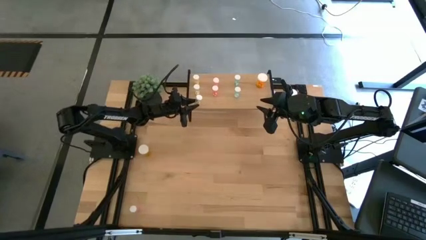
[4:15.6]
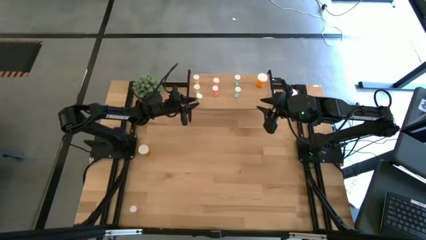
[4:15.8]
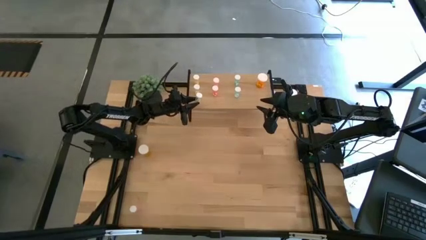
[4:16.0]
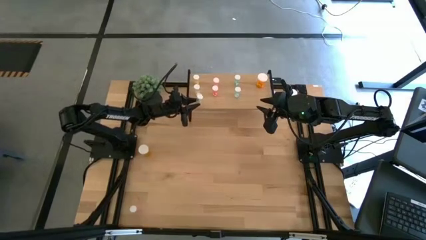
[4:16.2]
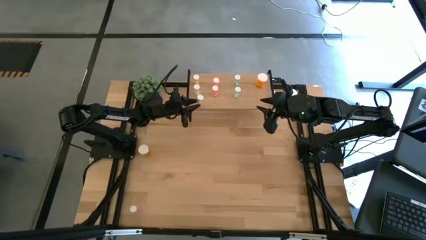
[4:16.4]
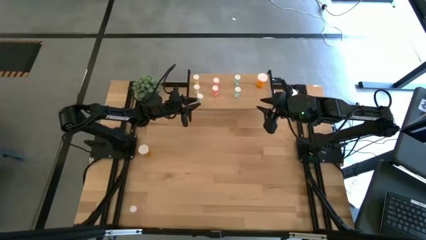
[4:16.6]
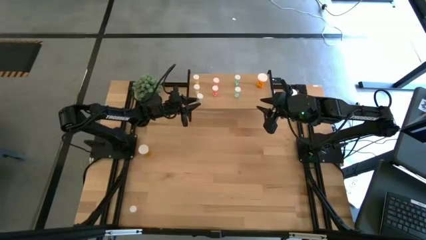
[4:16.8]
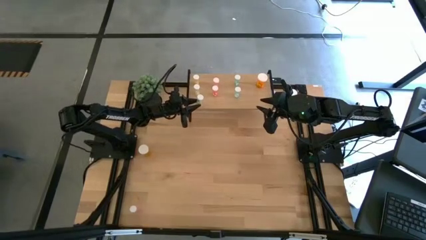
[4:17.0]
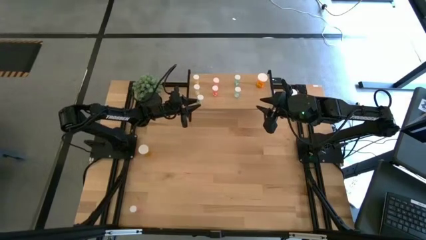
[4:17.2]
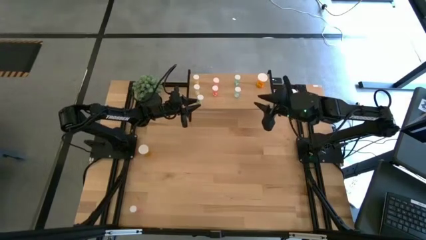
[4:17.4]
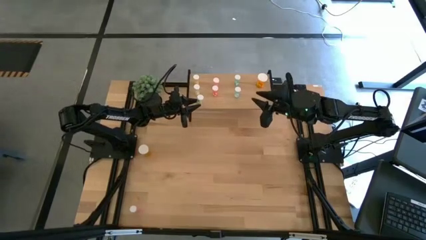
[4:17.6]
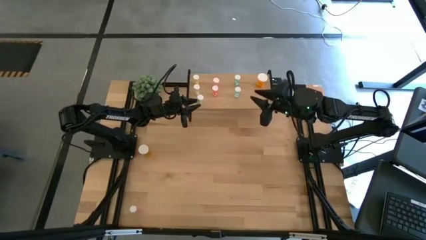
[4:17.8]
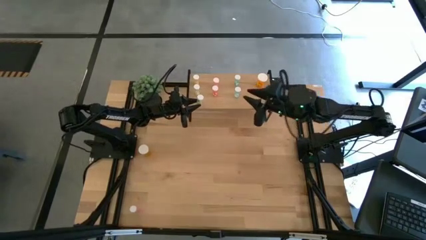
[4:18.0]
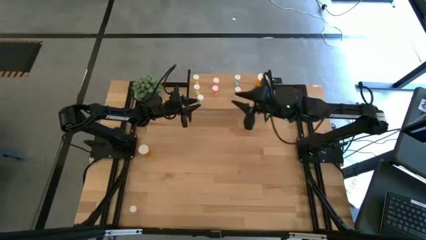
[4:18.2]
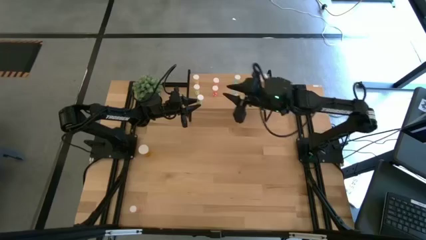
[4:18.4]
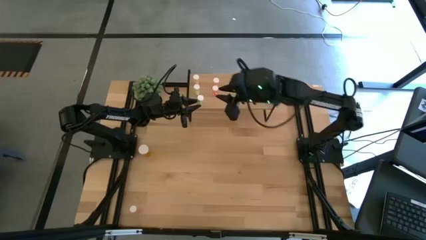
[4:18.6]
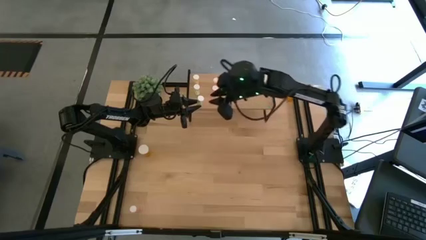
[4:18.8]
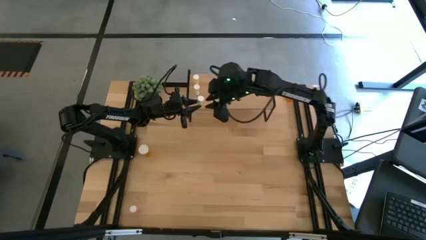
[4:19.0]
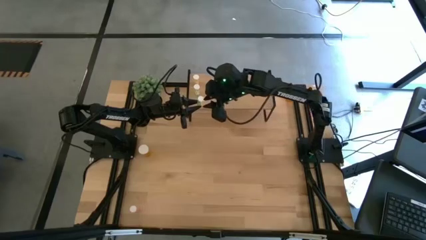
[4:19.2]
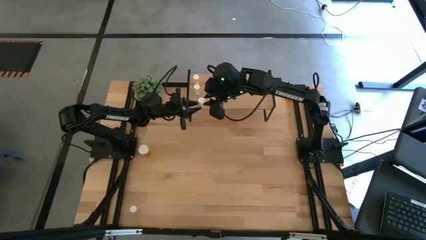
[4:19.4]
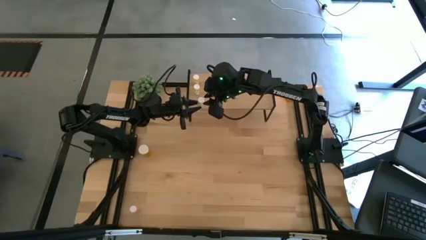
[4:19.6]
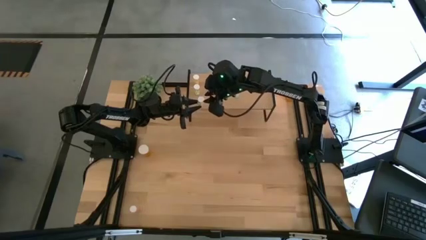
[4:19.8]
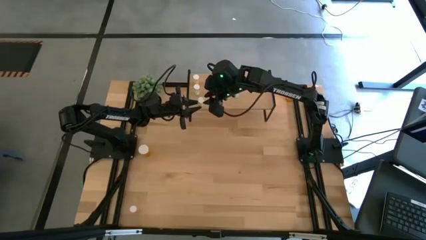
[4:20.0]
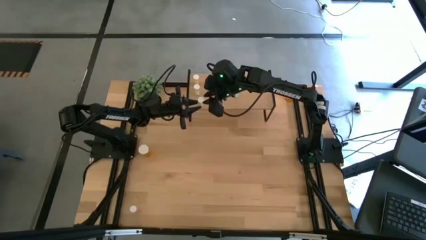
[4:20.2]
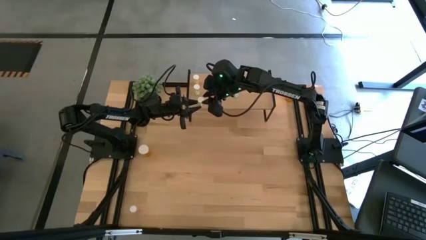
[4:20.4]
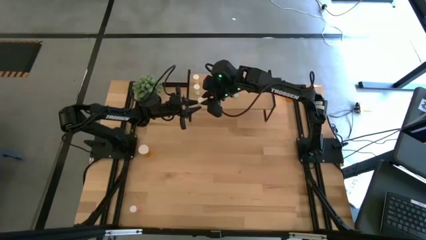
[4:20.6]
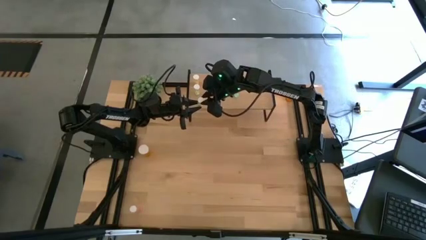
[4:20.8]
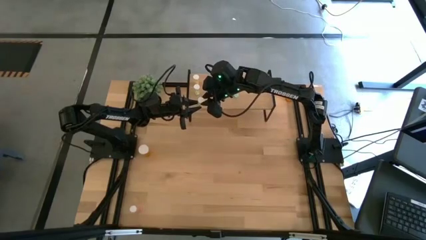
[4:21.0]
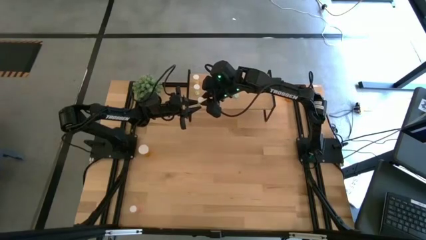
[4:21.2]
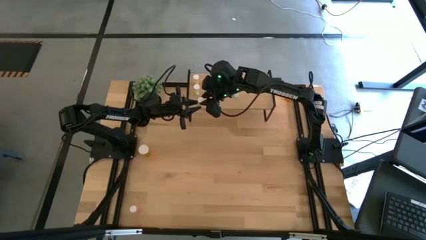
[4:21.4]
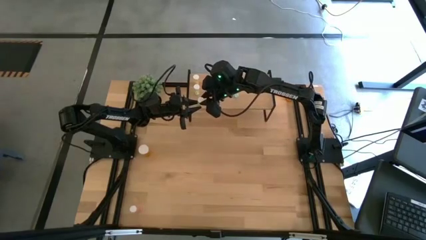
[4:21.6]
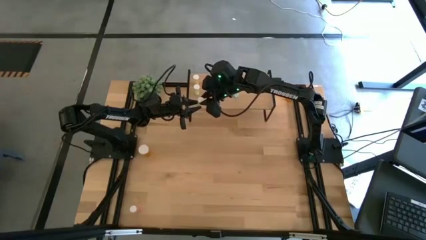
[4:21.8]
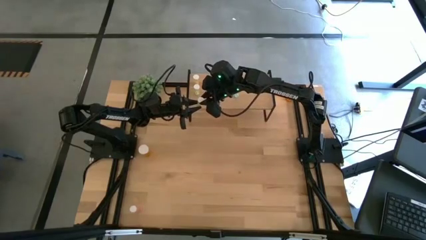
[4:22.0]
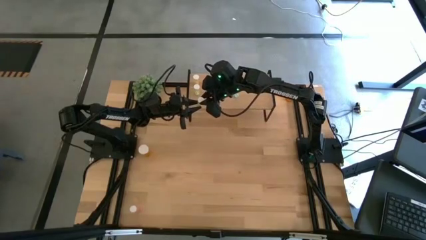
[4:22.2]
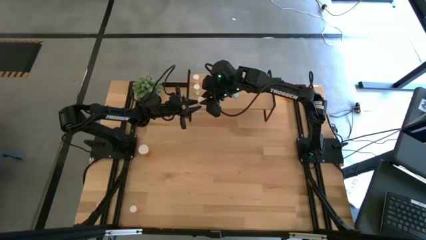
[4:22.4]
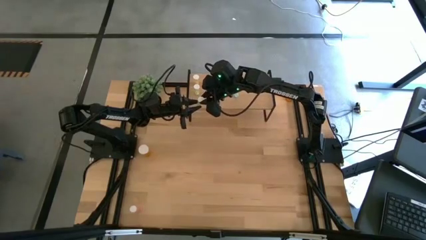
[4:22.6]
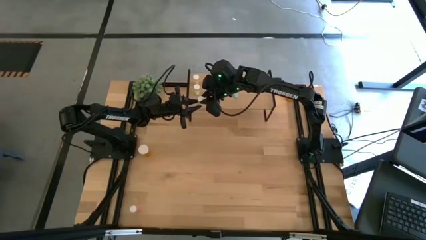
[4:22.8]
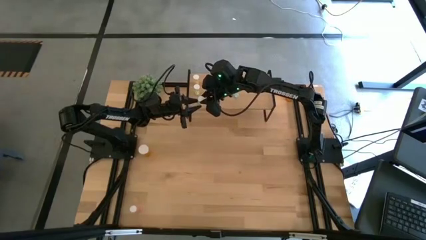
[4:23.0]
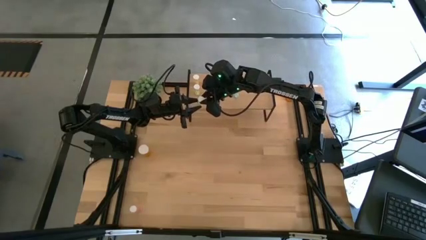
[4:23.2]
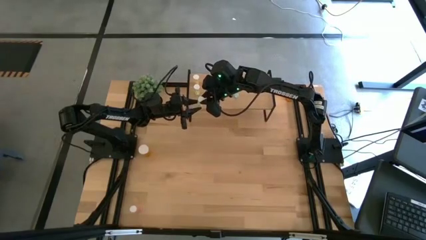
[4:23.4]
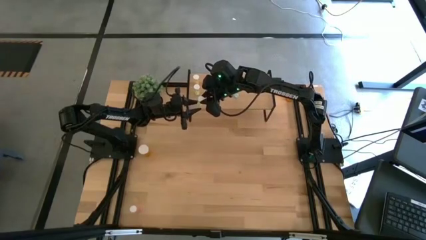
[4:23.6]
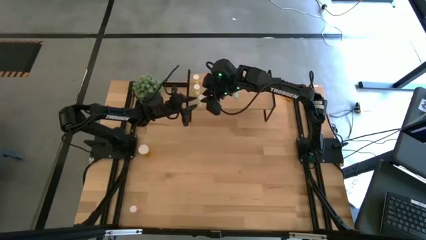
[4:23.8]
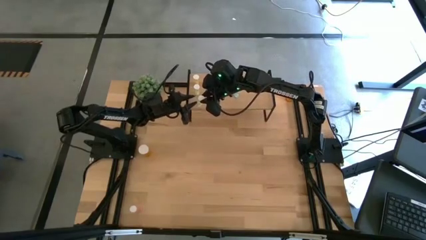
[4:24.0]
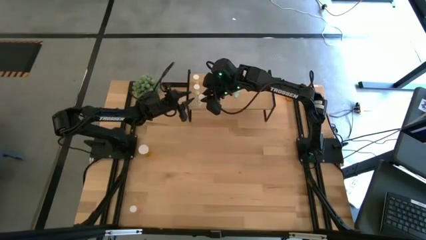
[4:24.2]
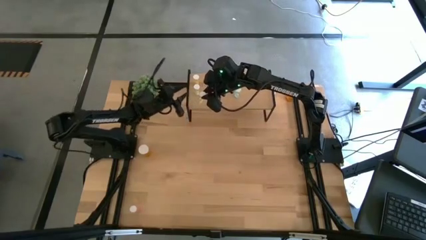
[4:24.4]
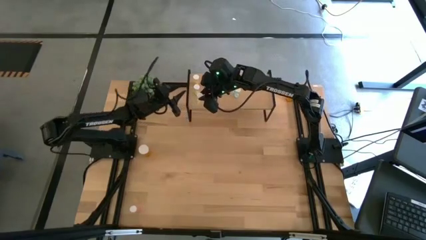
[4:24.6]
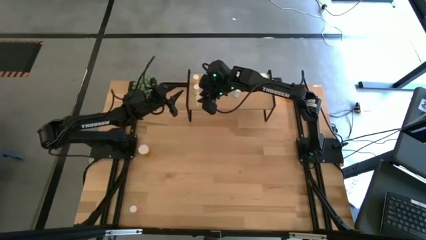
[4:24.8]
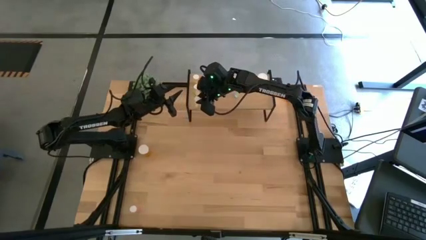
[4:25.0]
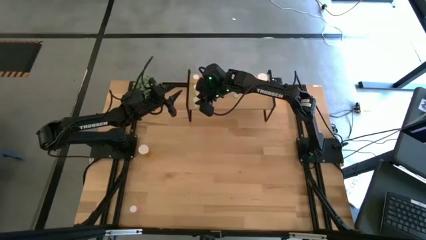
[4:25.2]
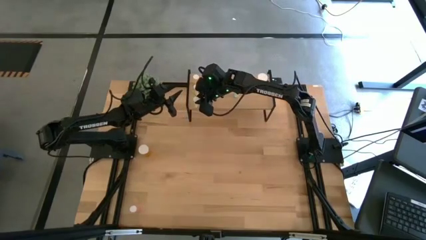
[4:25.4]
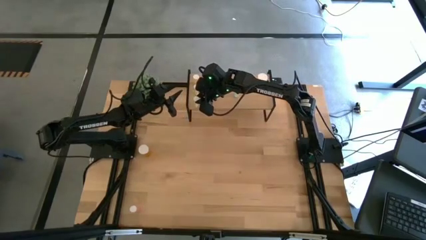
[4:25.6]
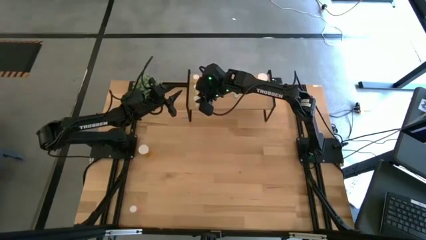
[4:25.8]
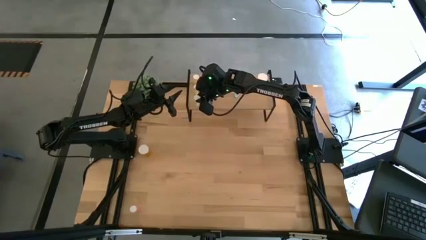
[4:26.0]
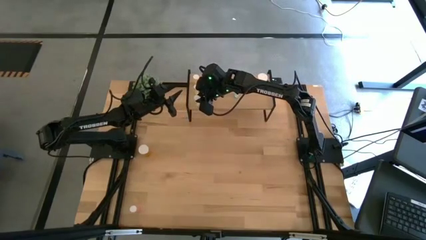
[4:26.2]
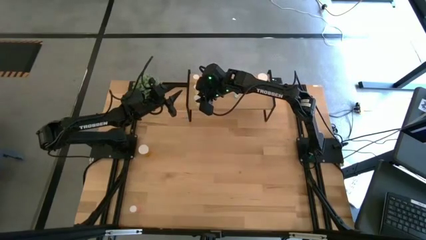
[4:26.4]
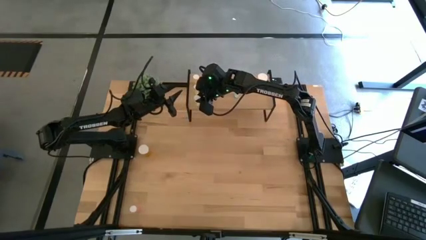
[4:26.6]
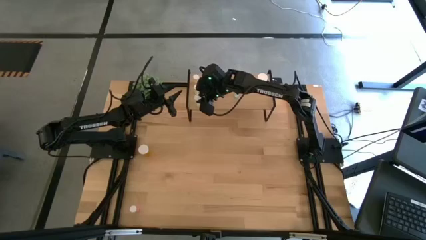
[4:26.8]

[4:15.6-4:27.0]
Task: Pick and place medicine bottles onto shelf by color
Put the yellow pill bottle on the shelf aligned with the other yellow pill bottles

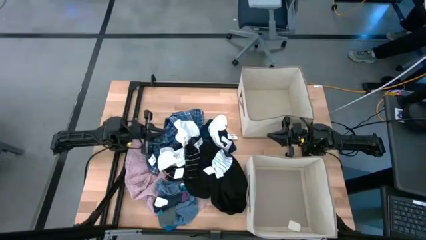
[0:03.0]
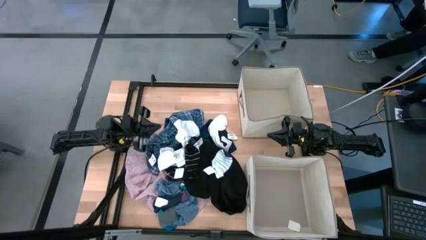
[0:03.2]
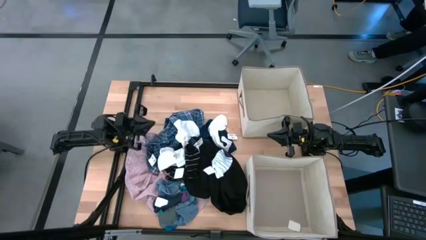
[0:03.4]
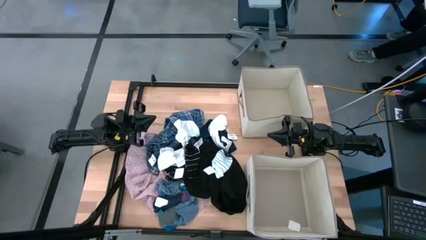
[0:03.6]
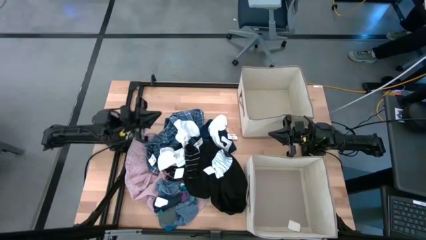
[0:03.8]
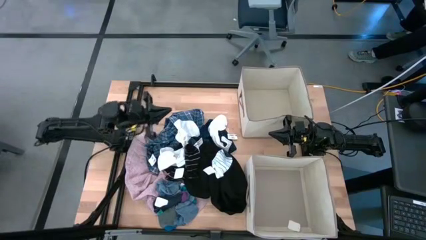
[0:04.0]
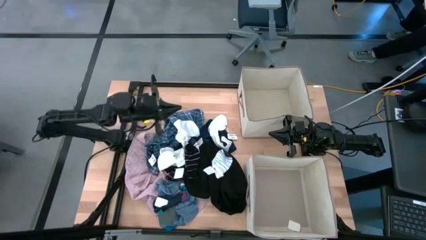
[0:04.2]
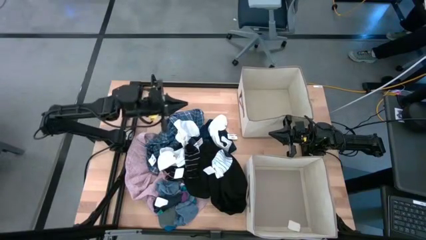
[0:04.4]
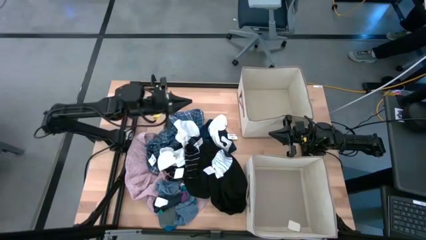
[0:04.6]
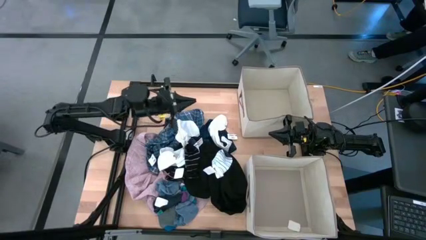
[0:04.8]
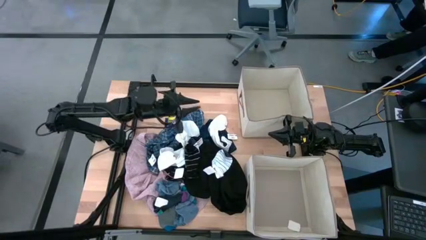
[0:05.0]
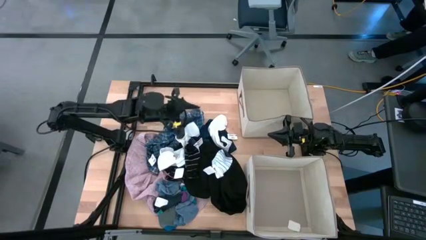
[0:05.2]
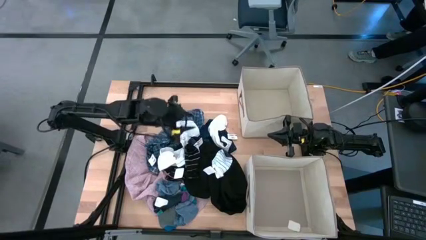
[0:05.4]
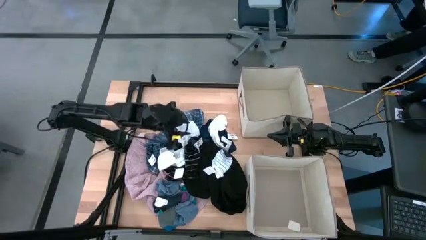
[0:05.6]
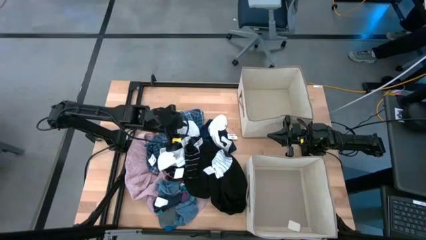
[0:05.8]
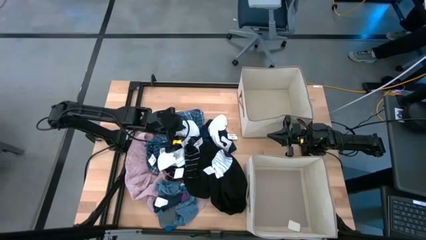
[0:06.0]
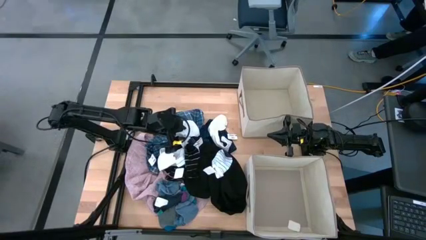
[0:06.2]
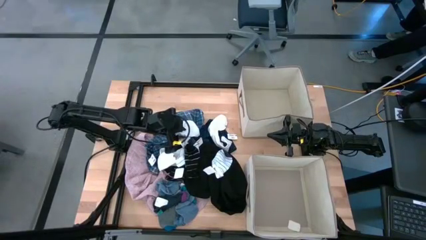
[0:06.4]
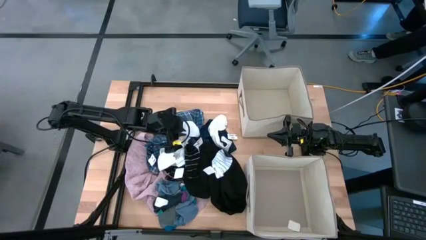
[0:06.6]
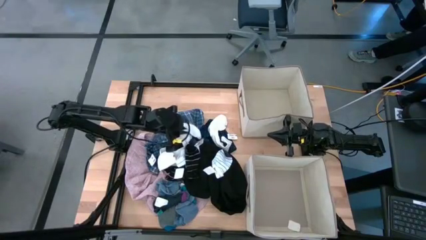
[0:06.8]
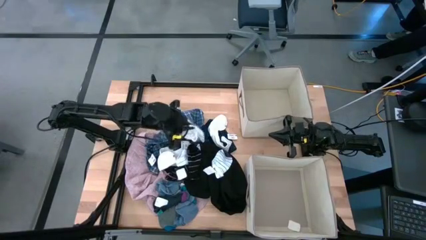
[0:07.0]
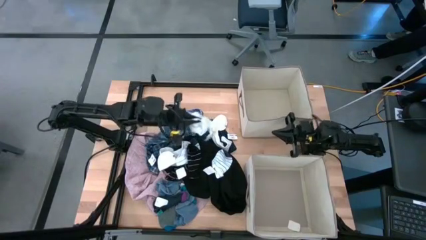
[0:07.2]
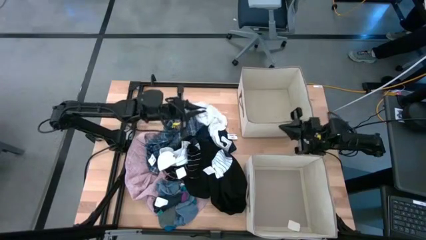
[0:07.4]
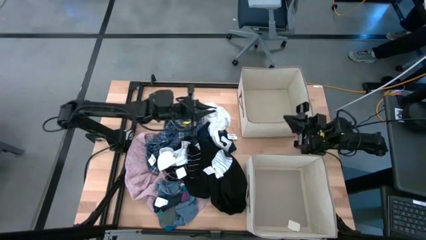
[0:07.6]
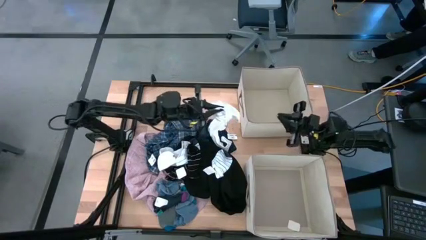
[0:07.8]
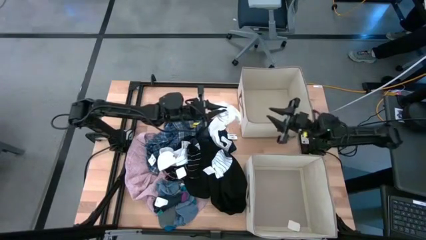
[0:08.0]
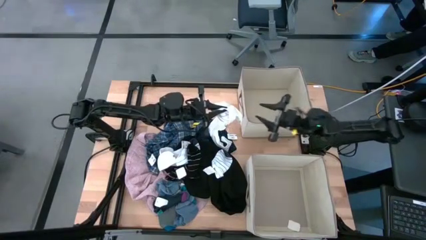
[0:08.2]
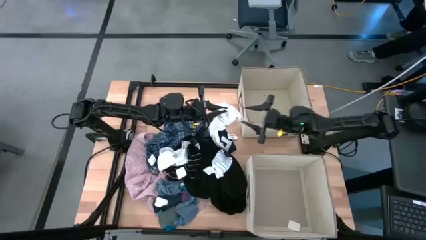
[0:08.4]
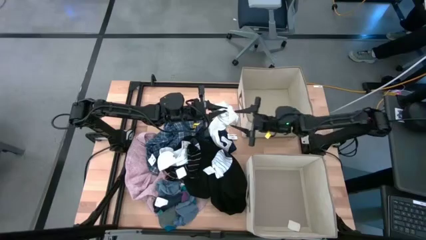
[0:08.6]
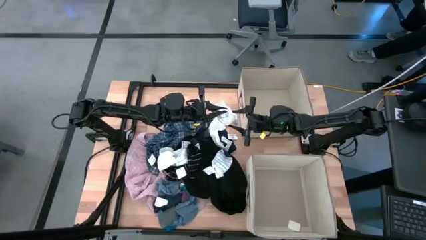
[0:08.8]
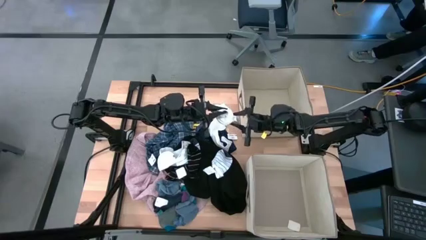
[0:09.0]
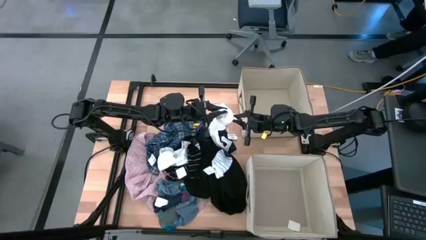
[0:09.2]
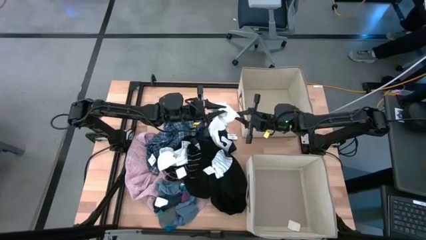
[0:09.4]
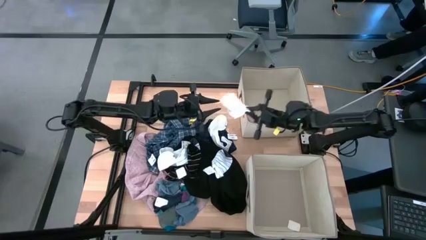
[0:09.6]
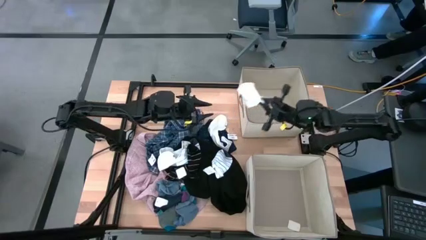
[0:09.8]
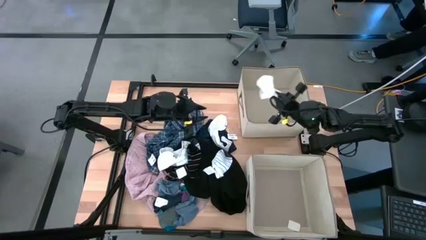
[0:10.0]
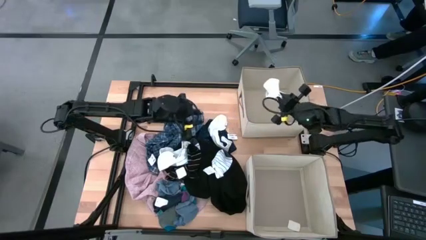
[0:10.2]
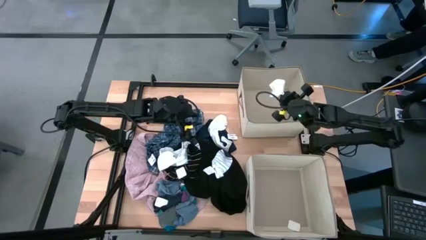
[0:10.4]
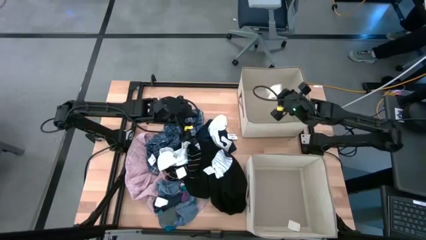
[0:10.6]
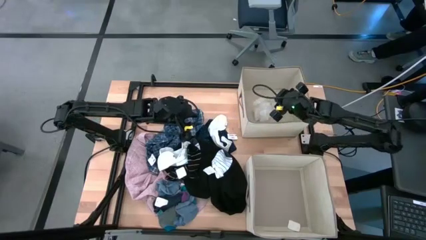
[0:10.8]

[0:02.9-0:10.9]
Task: Sort clothes
Put the white pair of socks into the top laundry organizer
